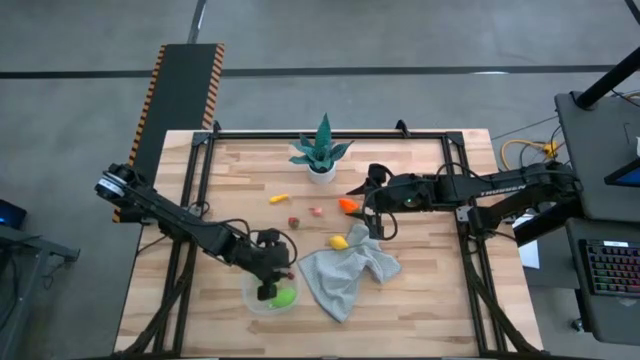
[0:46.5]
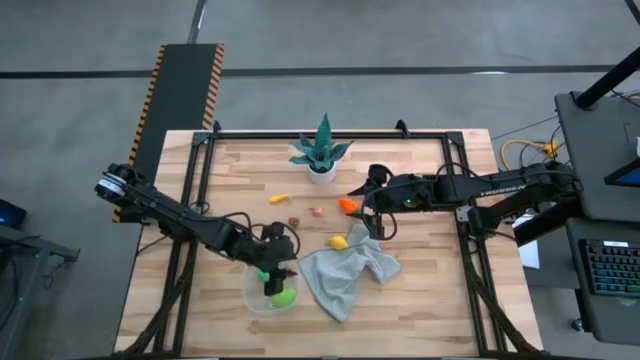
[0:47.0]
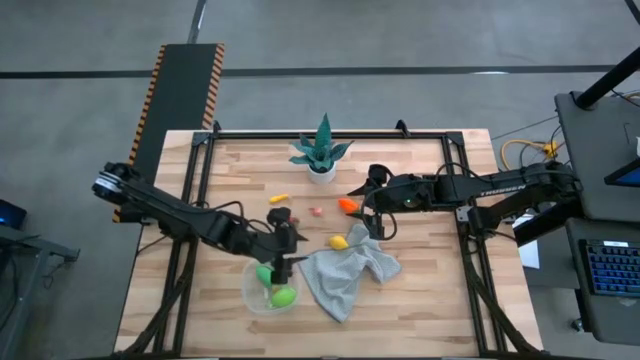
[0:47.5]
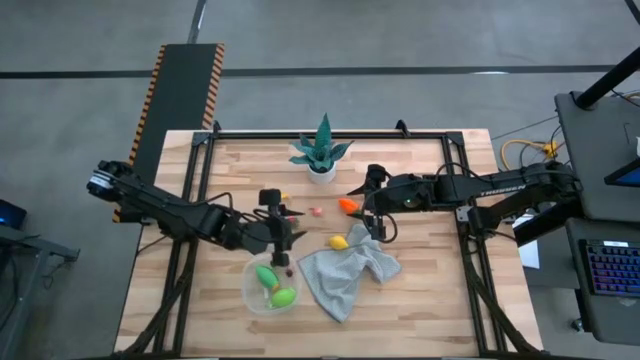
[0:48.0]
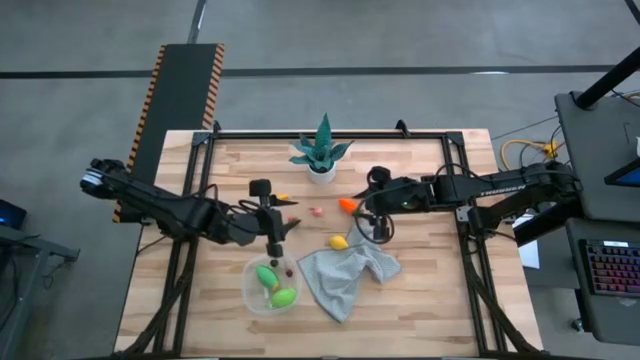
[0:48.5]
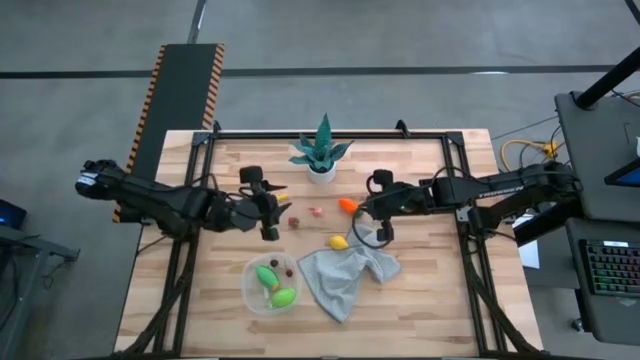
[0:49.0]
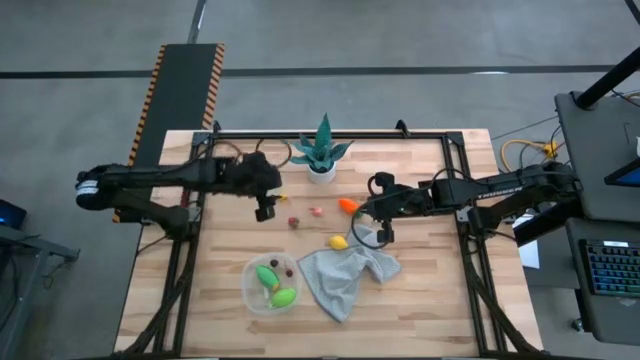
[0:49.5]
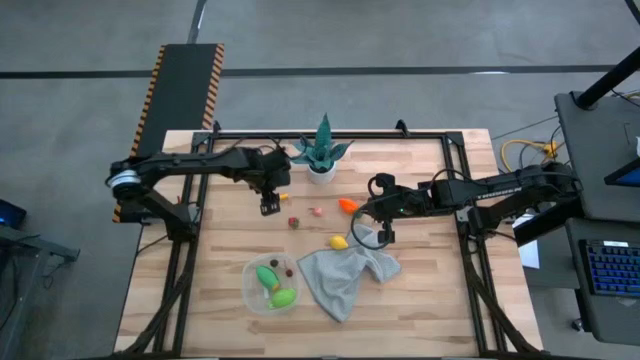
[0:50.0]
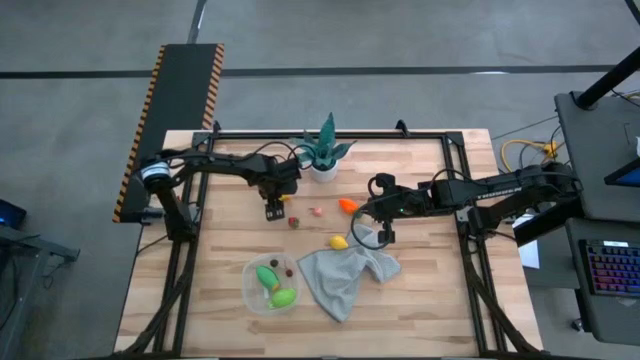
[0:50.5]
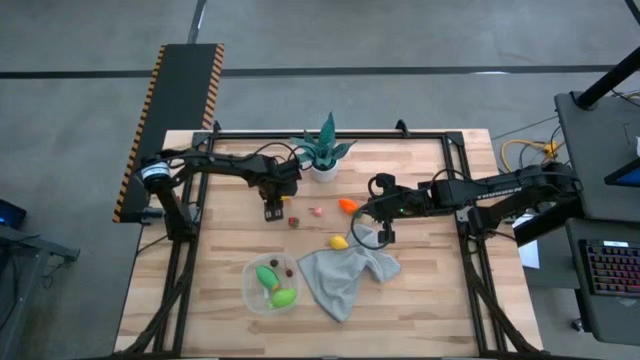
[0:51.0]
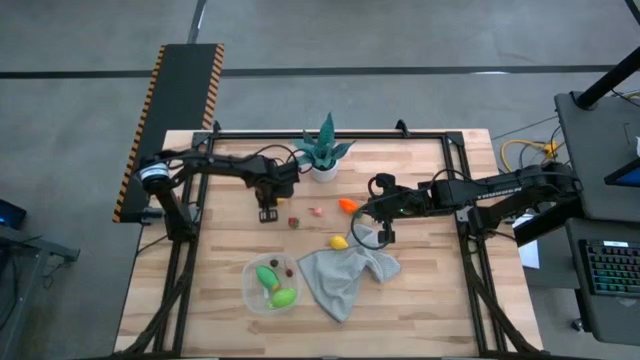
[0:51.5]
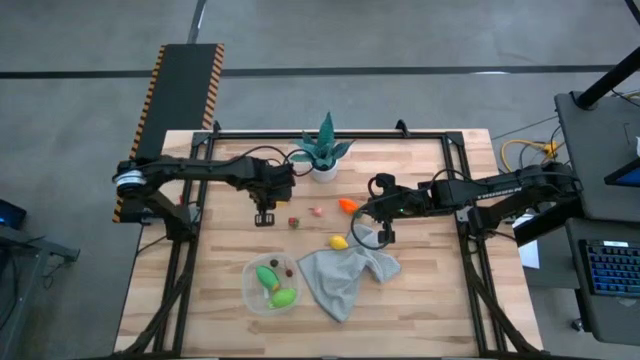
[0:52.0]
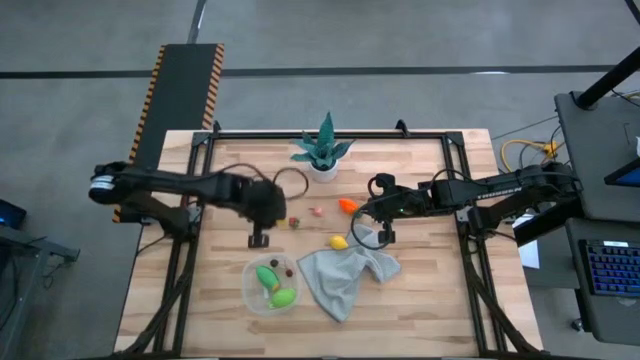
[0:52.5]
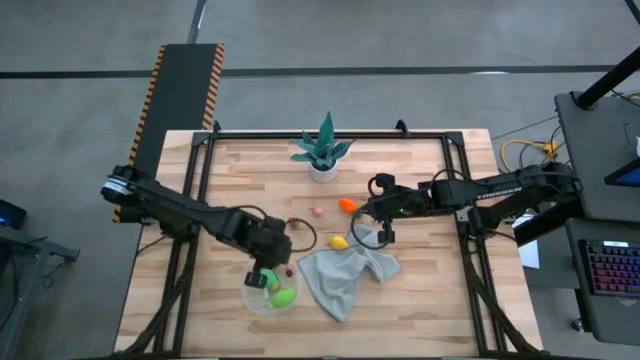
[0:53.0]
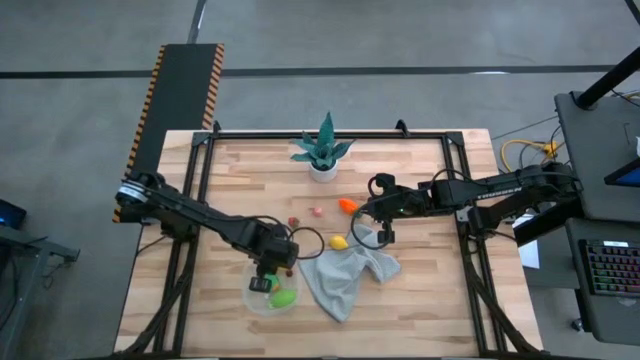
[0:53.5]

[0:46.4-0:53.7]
Task: Pick and placing Produce into tupperware
Put the yellow corn in the transparent bin

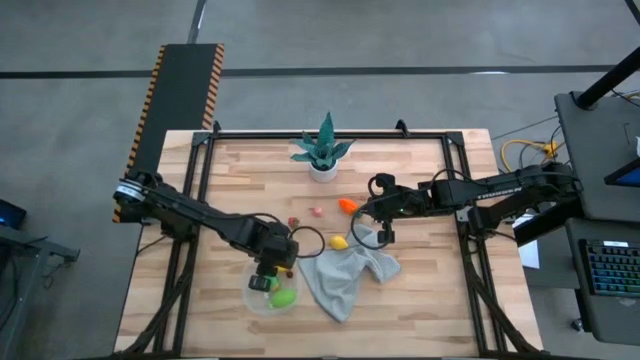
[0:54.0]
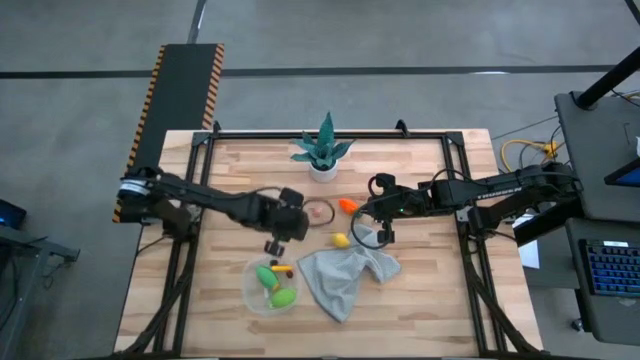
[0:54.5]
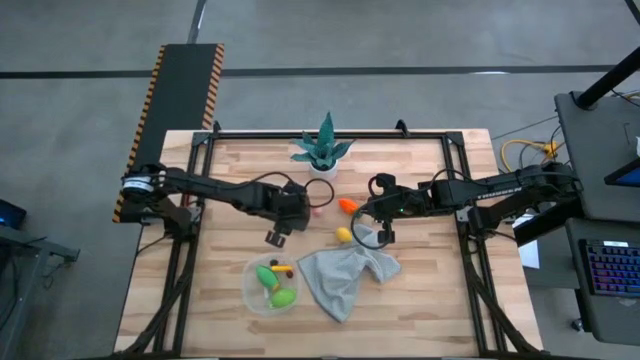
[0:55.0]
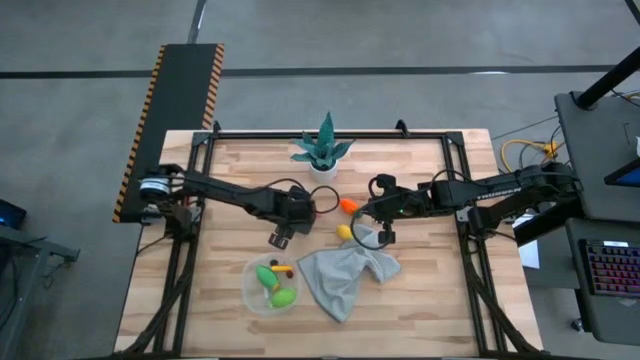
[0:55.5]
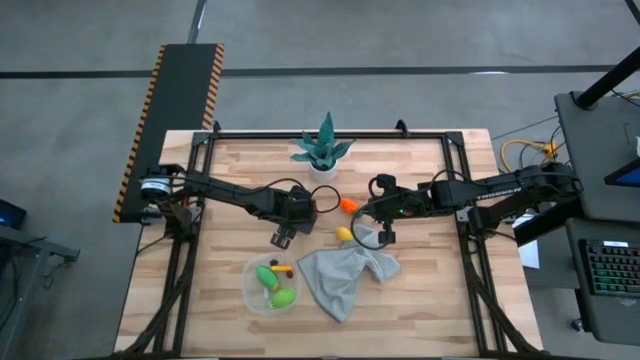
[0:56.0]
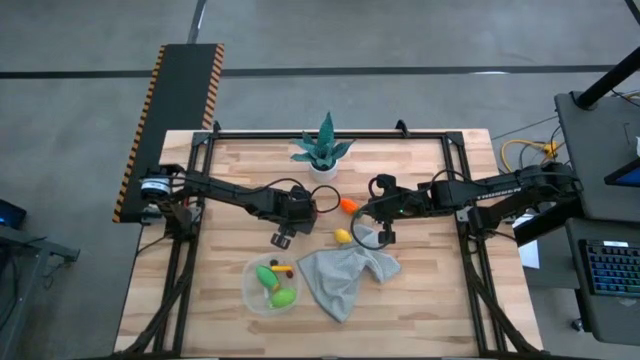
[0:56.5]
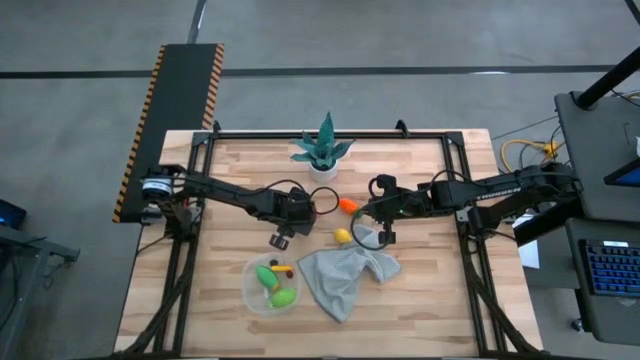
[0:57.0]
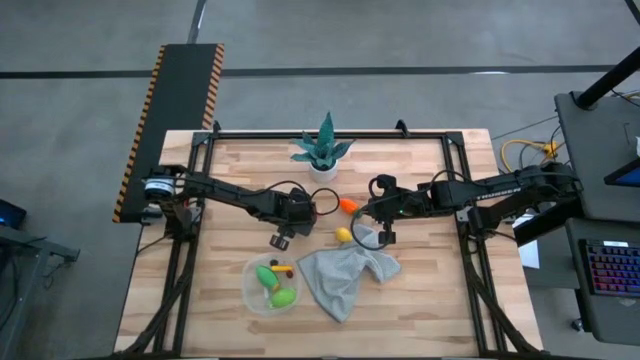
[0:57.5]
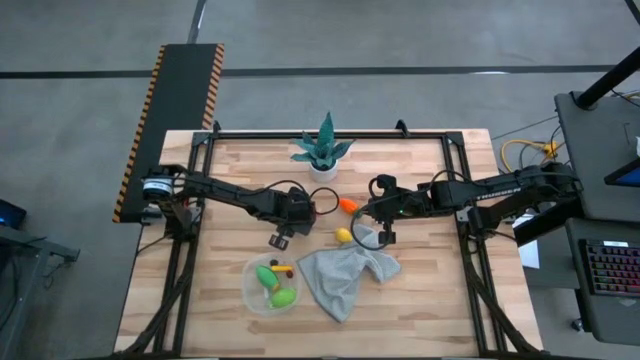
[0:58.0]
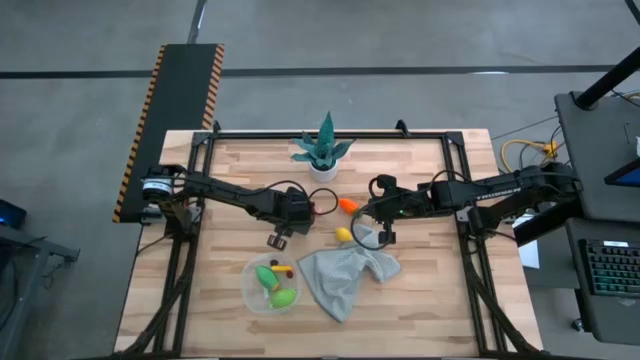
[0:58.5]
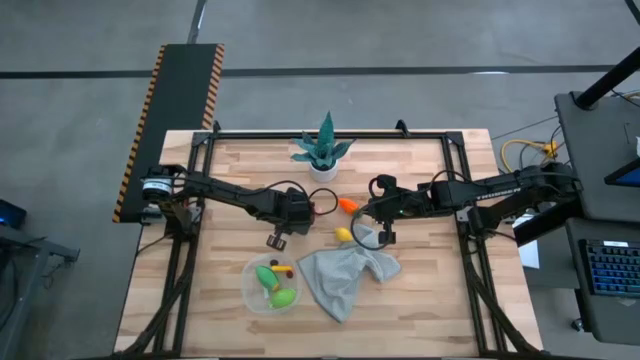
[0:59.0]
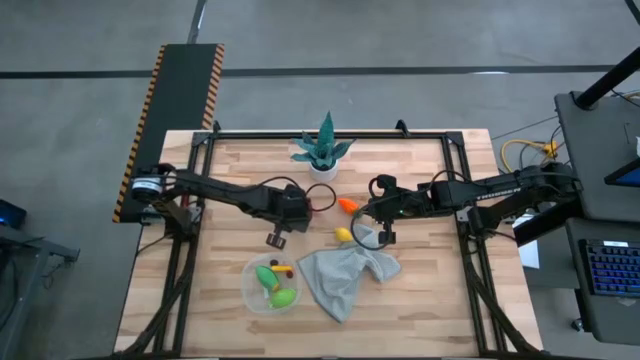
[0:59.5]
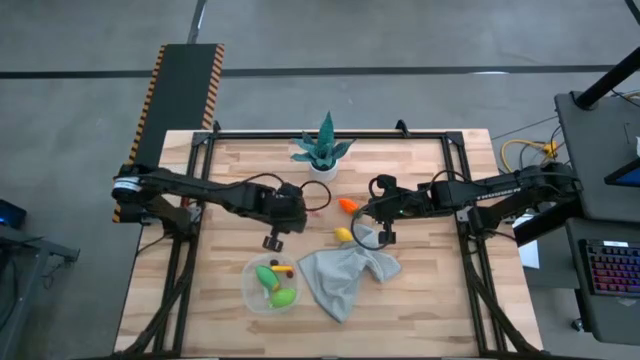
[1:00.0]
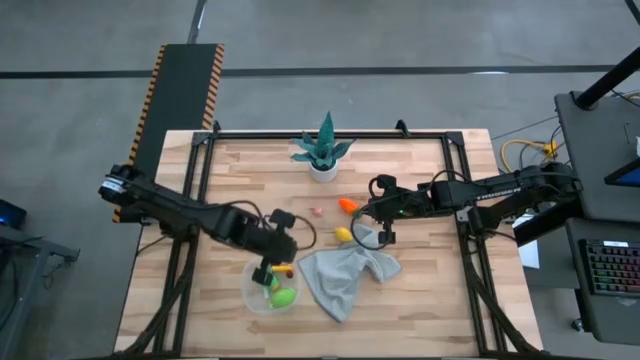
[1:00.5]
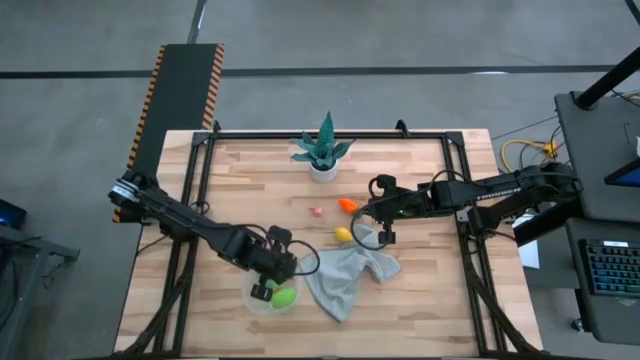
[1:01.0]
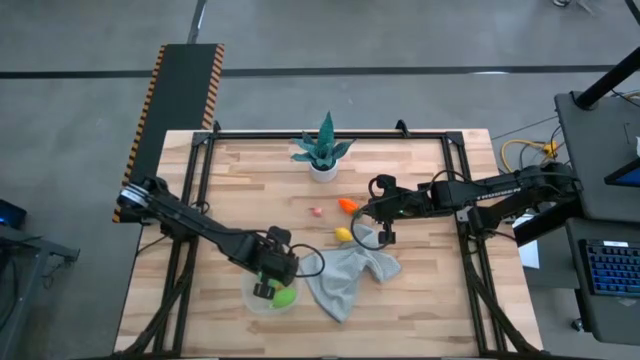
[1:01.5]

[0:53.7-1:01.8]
Put the red strawberry in the transparent bin

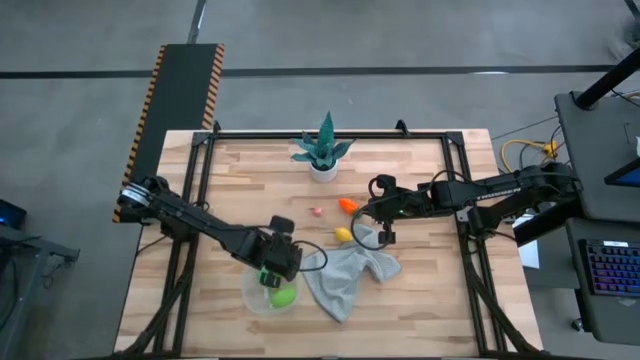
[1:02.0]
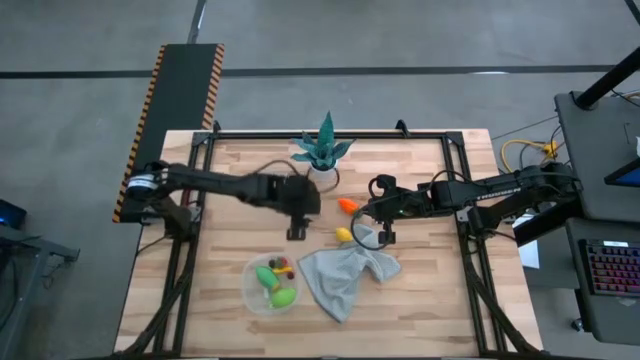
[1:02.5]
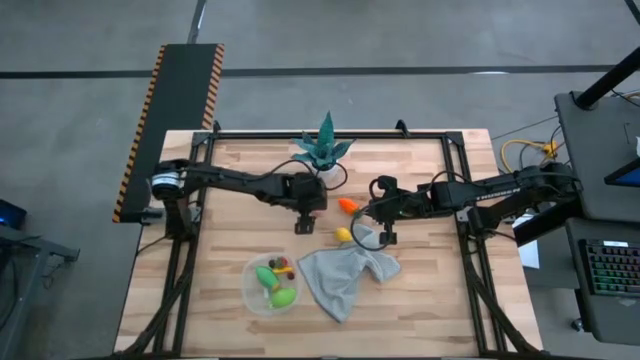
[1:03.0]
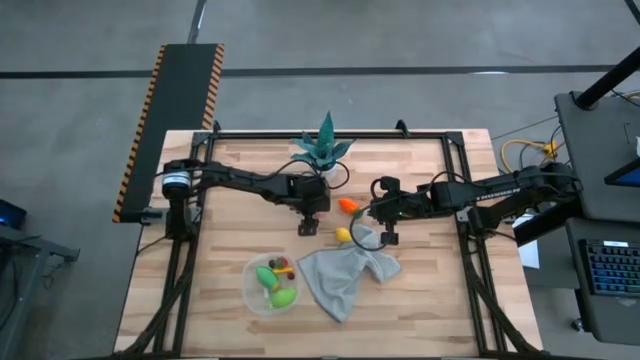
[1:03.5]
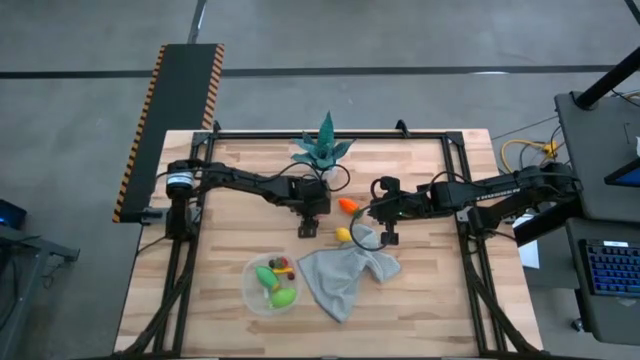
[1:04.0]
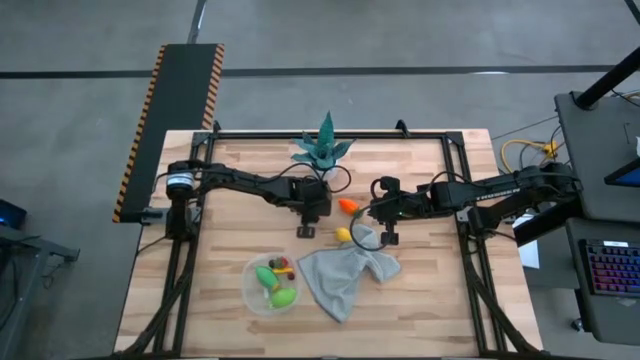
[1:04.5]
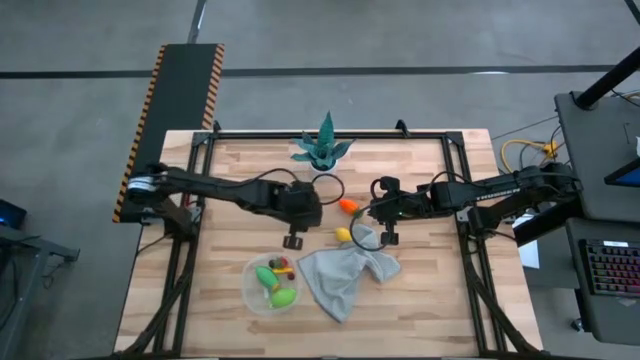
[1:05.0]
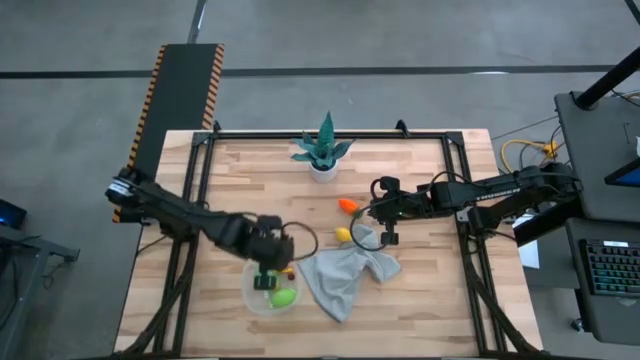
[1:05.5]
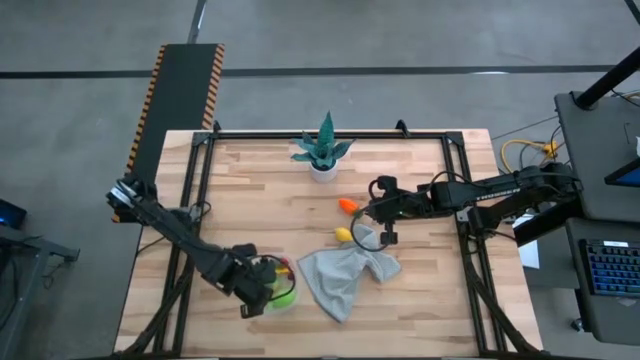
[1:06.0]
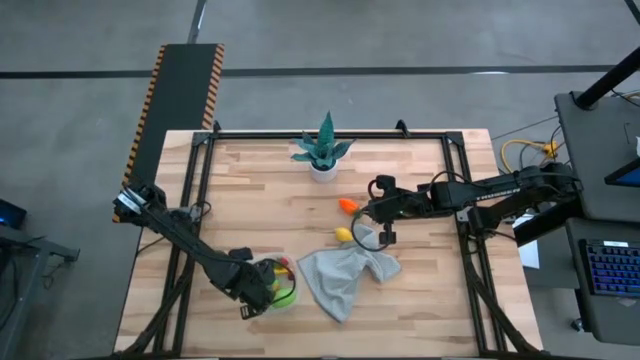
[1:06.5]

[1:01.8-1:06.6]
Put the pink peach in the transparent bin

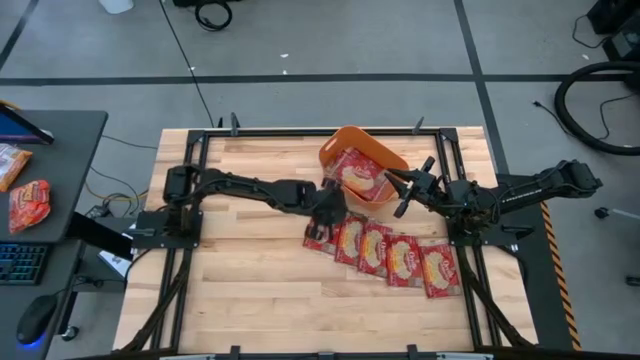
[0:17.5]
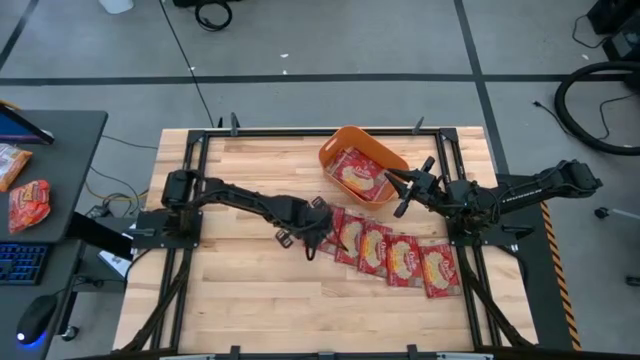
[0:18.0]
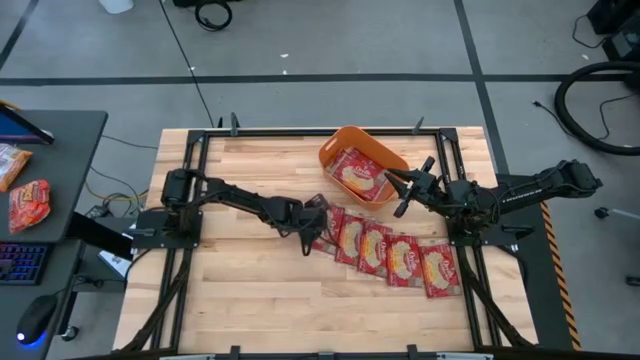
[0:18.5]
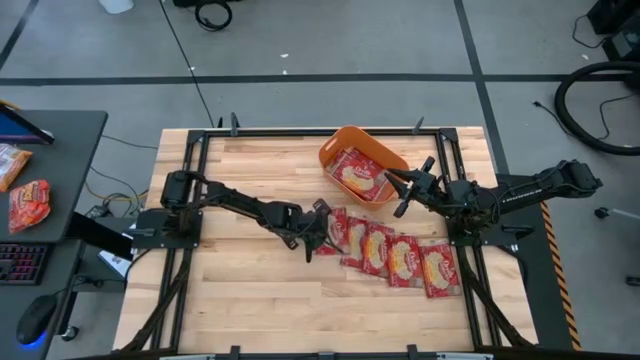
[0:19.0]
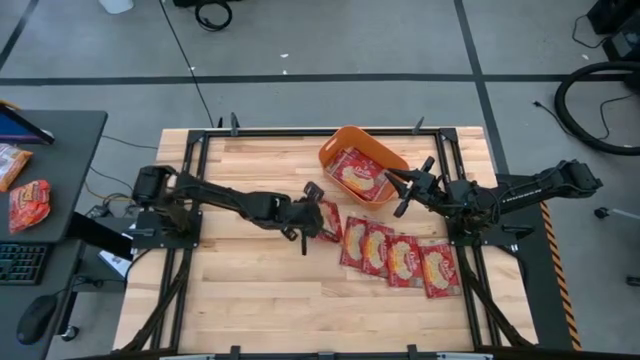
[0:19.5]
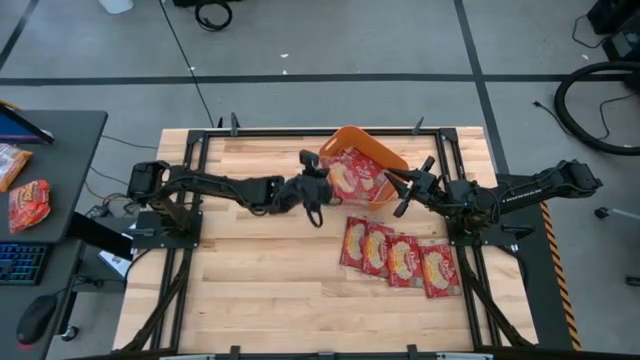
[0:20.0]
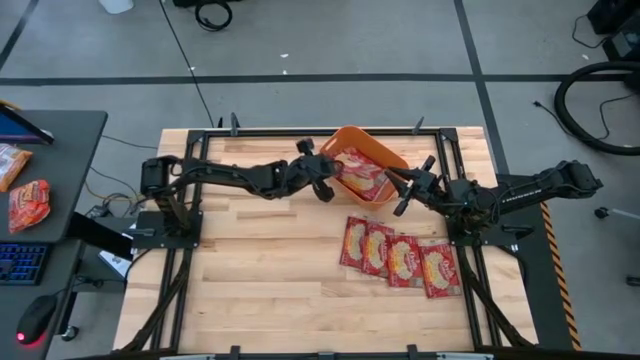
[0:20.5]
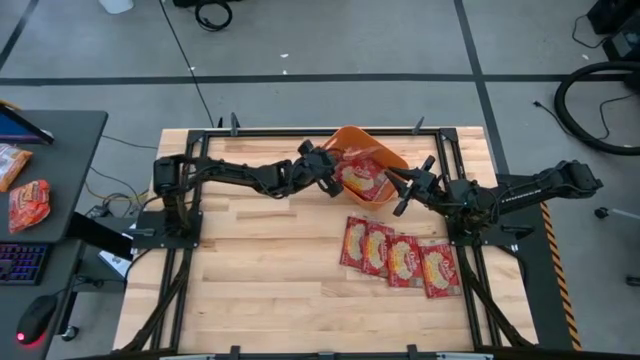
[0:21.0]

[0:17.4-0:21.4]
Task: Sort popcorn bags into baskets
Put the popcorn bag into the bin
